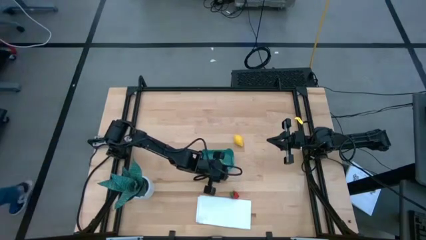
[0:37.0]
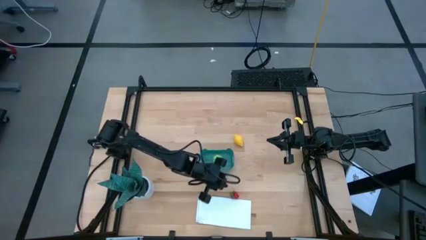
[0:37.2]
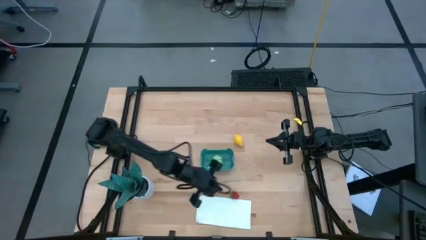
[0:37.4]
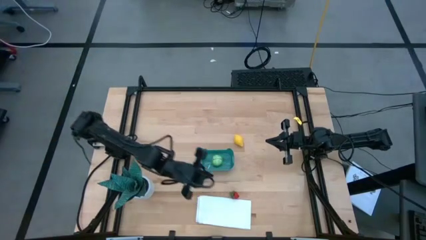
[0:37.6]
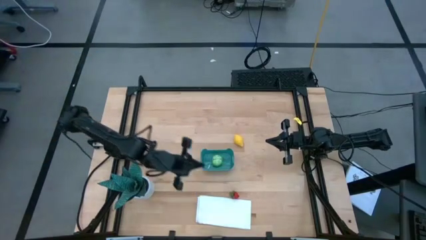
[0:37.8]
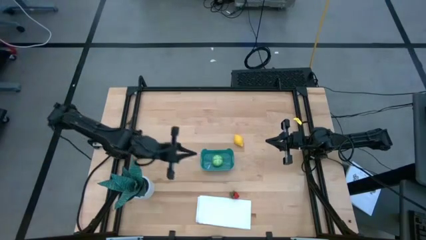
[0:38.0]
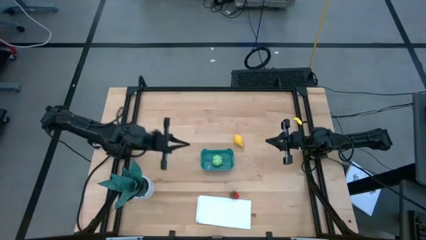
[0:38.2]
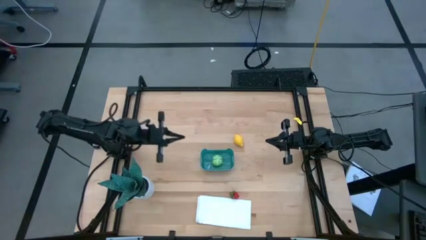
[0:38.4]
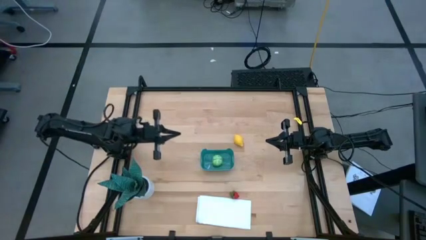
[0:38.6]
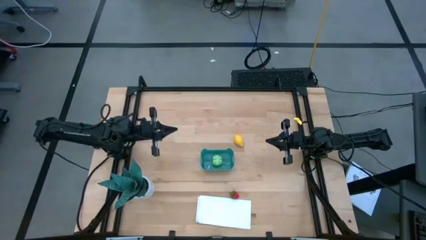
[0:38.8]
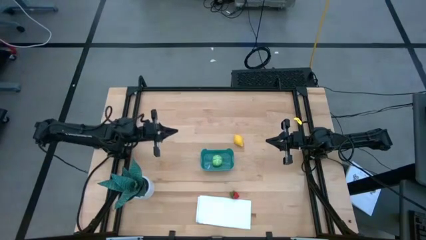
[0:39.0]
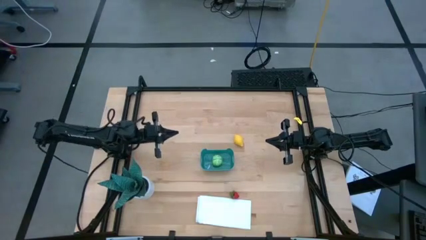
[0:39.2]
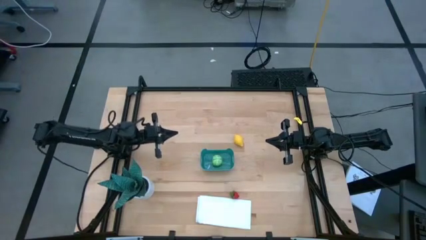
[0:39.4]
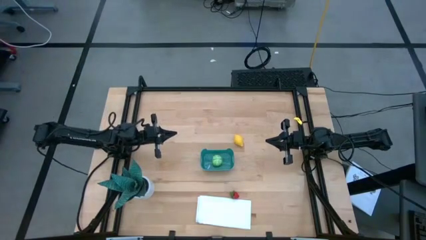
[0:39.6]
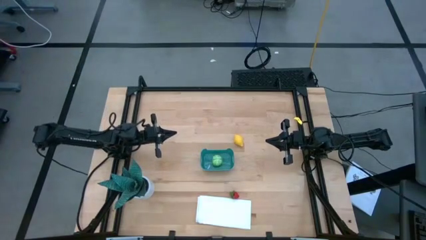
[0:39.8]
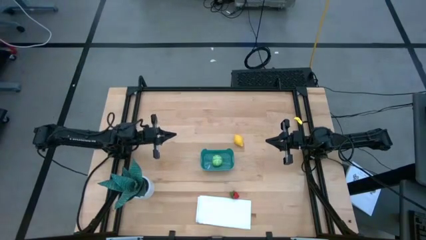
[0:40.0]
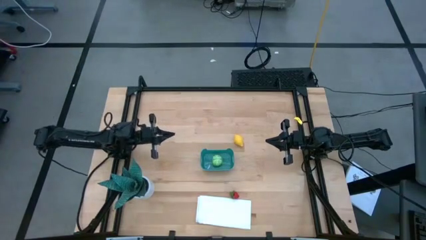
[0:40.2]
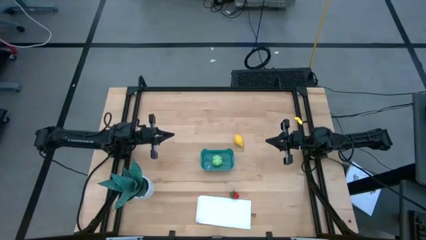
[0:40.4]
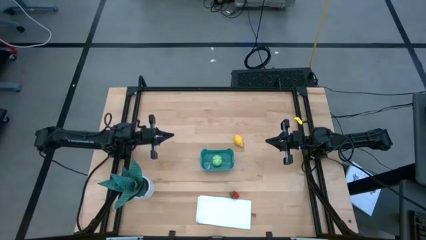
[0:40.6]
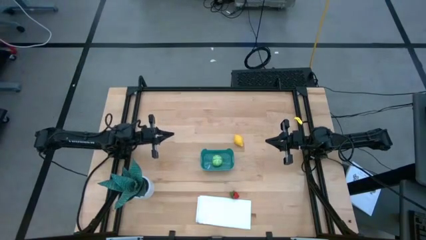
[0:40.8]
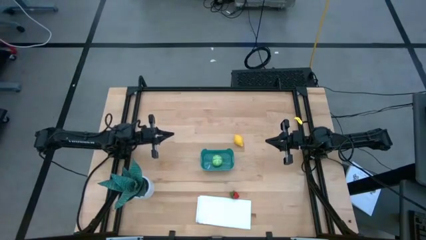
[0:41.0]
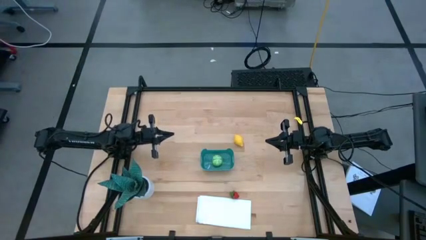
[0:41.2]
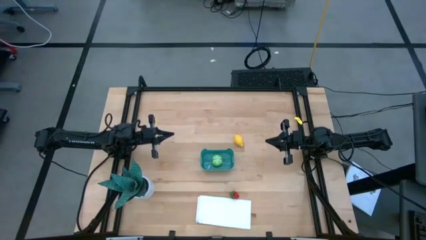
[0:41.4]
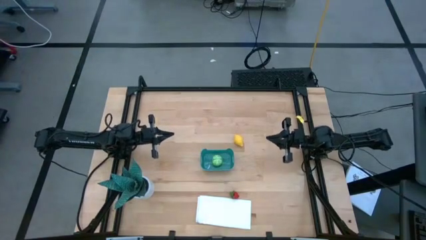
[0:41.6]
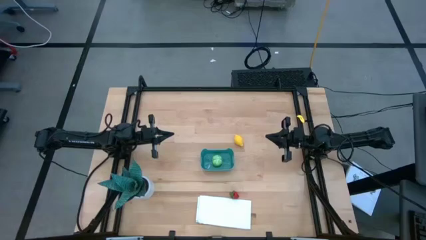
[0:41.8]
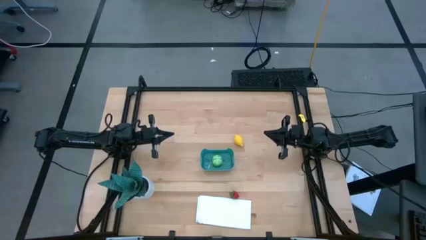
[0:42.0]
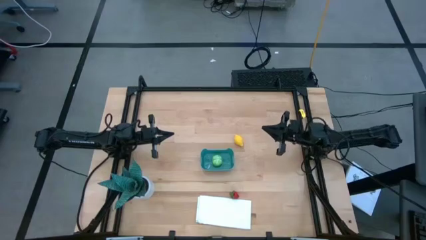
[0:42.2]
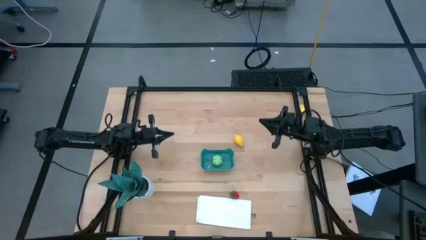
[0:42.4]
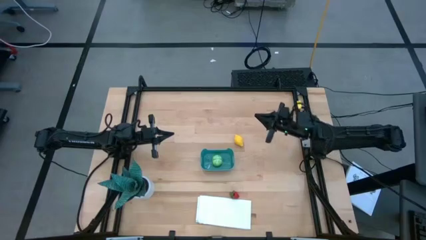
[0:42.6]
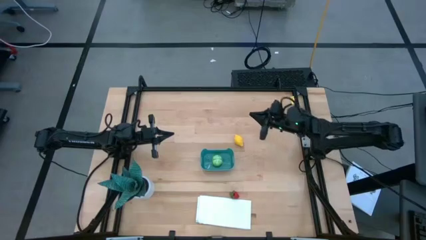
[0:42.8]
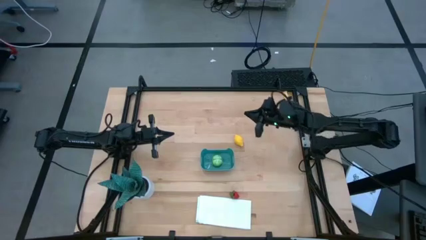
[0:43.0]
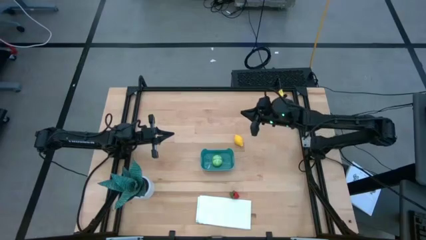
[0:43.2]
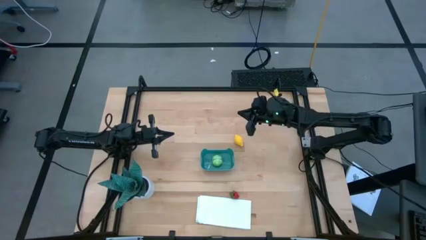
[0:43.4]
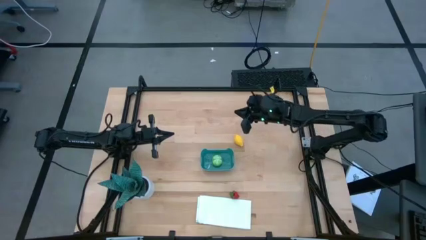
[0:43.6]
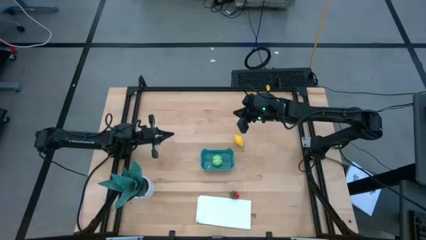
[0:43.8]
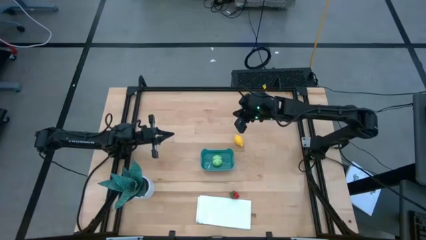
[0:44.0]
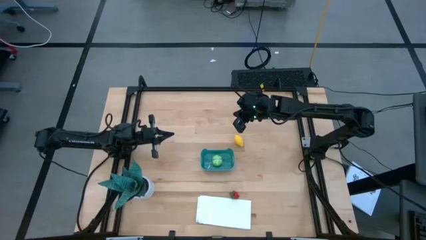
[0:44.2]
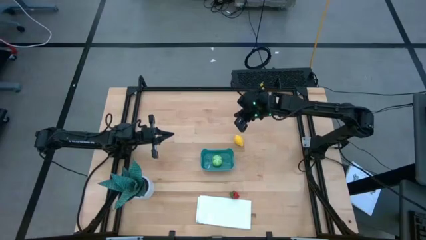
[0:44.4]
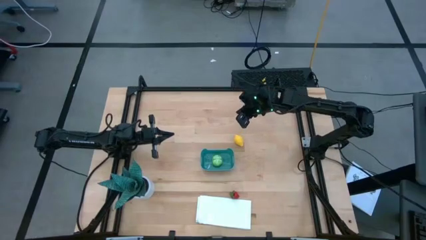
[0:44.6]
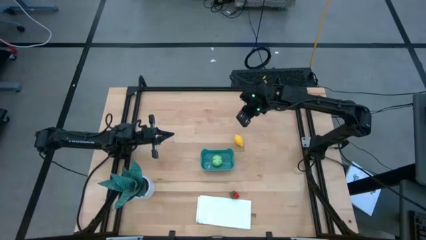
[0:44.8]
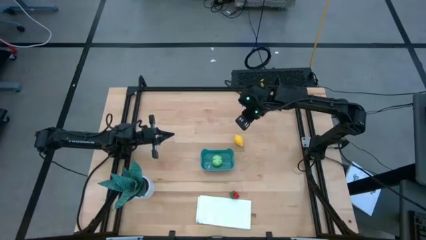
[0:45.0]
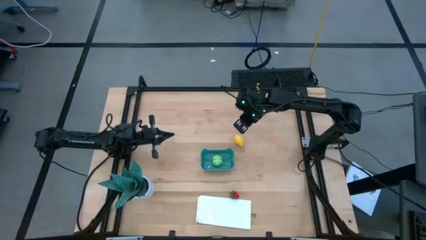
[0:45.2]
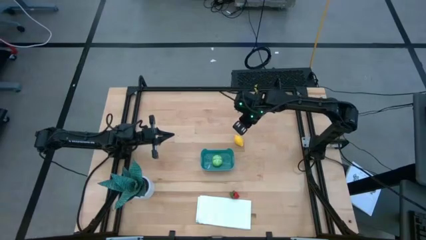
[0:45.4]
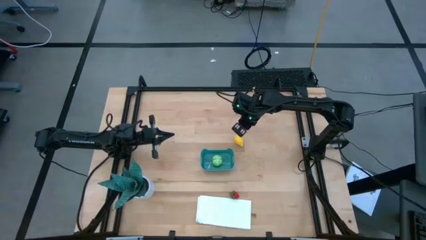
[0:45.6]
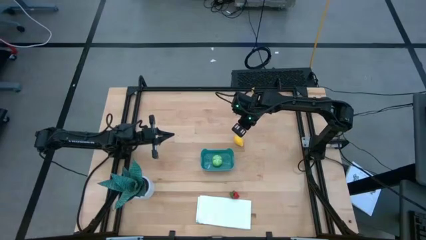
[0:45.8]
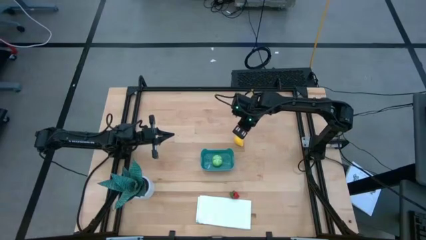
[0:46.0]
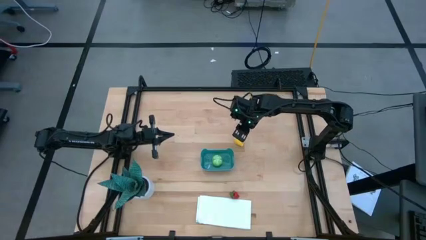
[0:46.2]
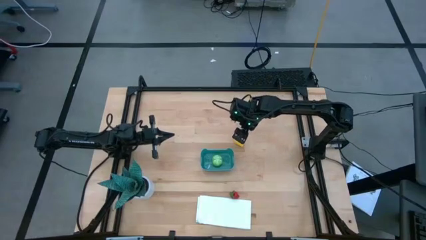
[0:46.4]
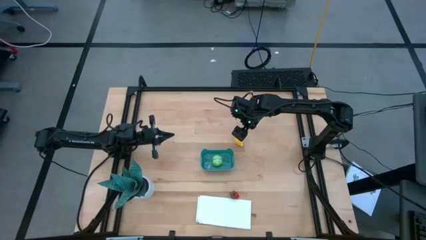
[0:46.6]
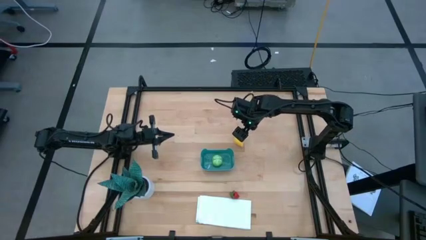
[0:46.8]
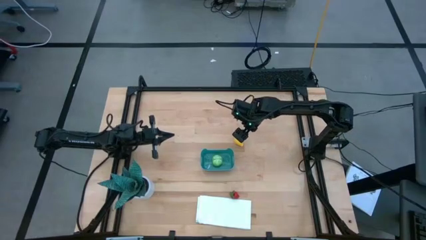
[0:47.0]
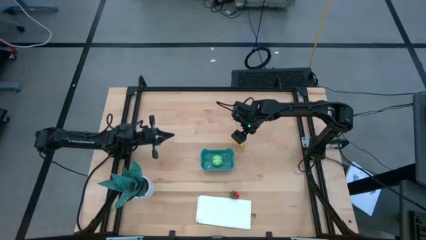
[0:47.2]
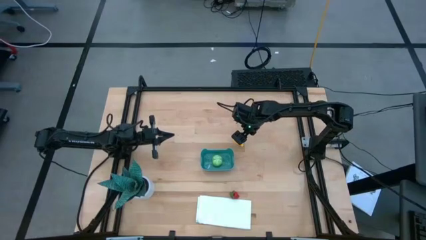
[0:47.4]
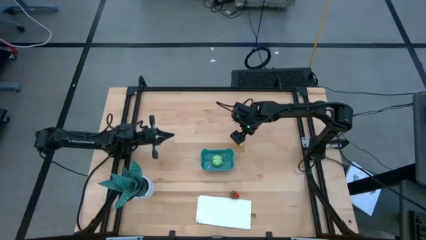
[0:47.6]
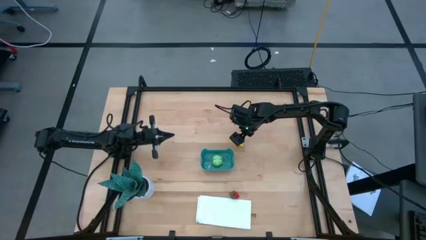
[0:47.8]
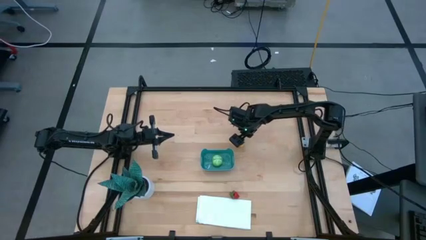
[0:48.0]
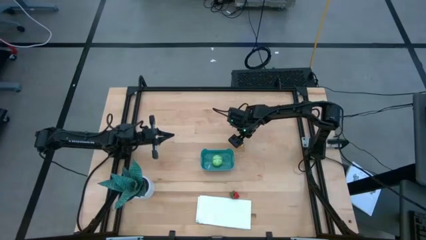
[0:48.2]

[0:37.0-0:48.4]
Task: Pick and placing Produce into tupperware
Put the lemon into the green bin

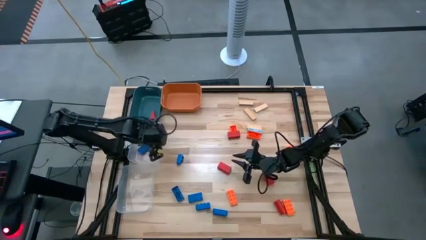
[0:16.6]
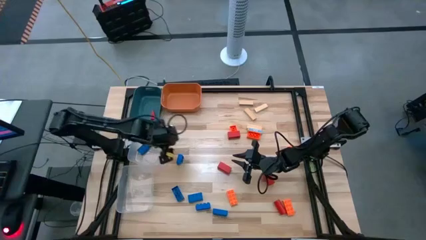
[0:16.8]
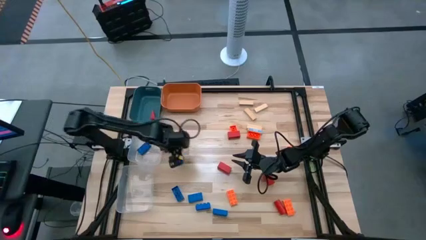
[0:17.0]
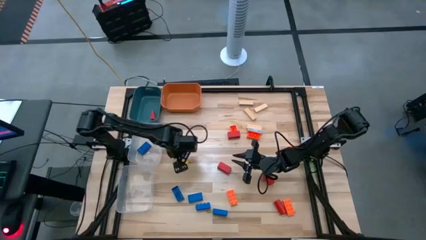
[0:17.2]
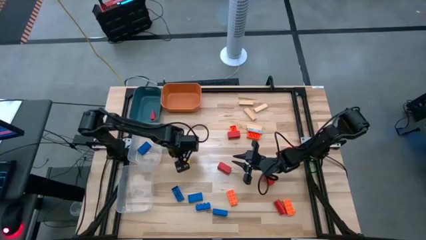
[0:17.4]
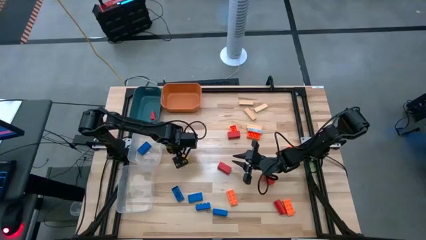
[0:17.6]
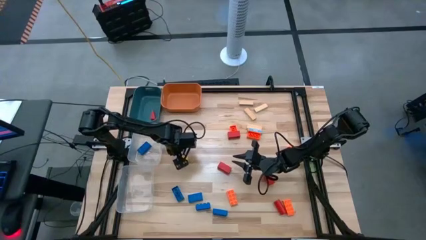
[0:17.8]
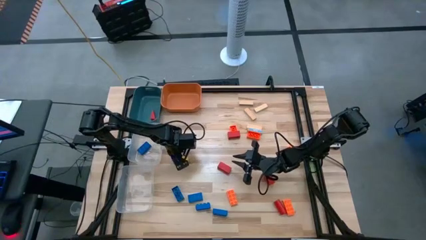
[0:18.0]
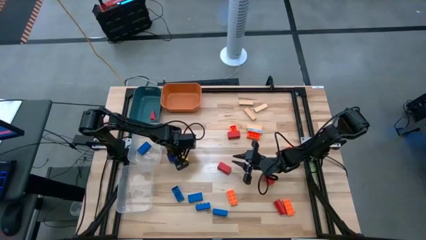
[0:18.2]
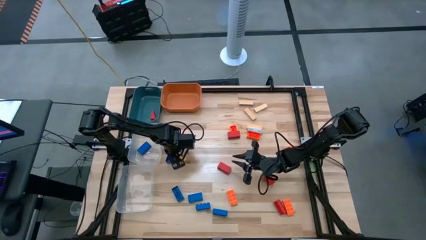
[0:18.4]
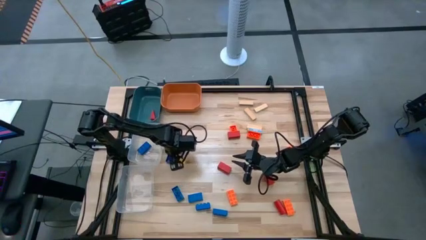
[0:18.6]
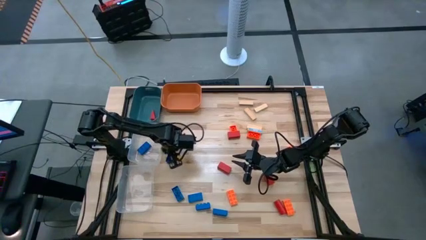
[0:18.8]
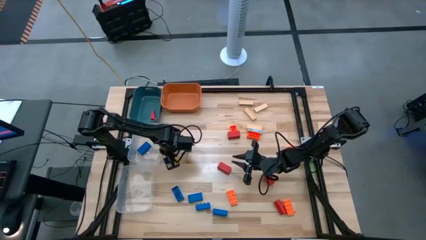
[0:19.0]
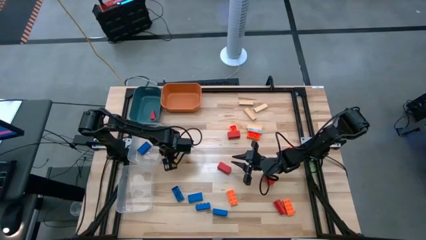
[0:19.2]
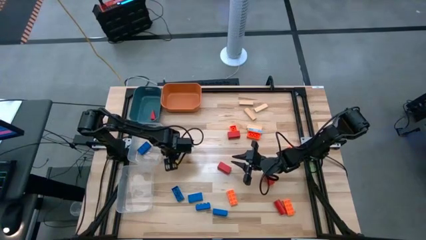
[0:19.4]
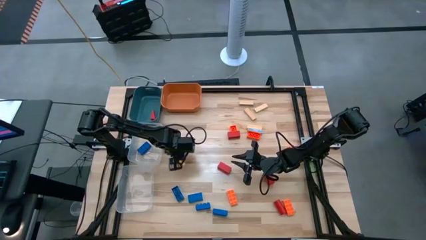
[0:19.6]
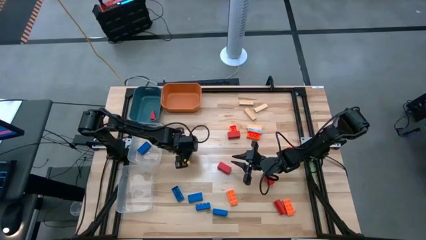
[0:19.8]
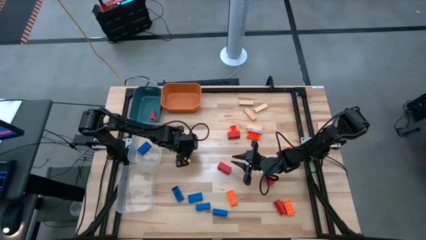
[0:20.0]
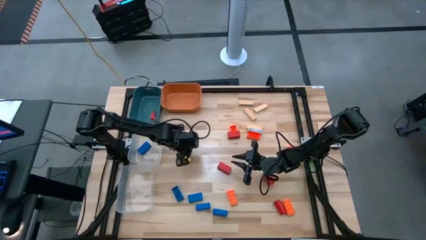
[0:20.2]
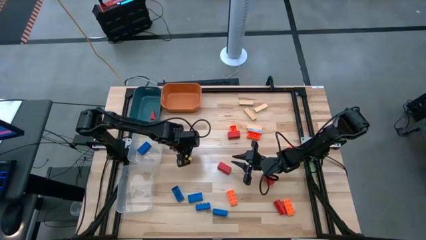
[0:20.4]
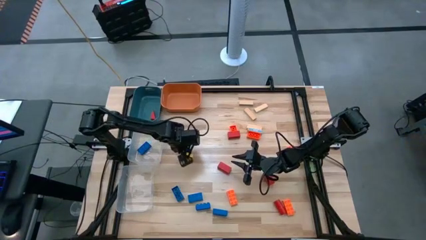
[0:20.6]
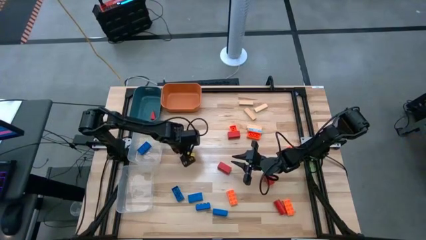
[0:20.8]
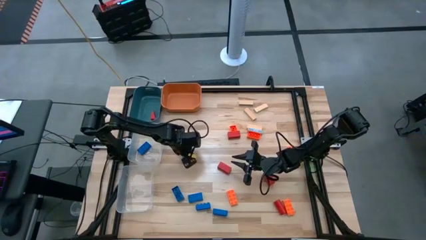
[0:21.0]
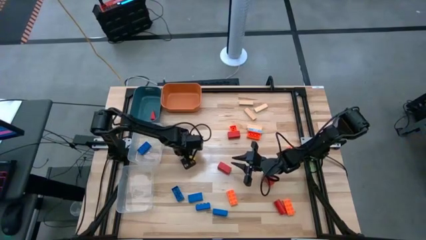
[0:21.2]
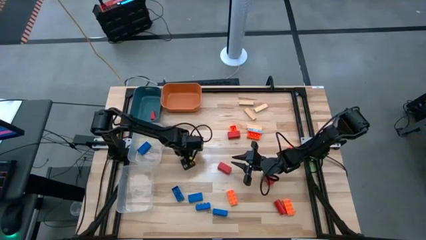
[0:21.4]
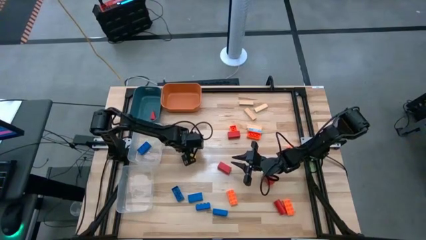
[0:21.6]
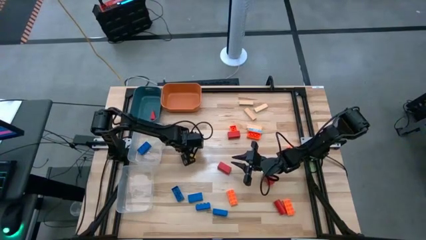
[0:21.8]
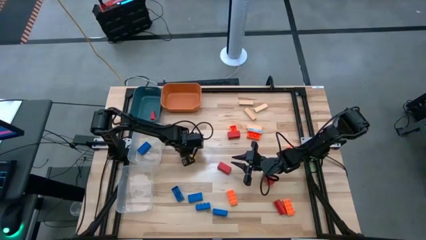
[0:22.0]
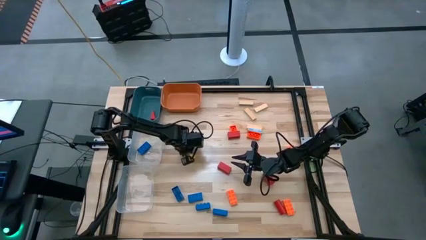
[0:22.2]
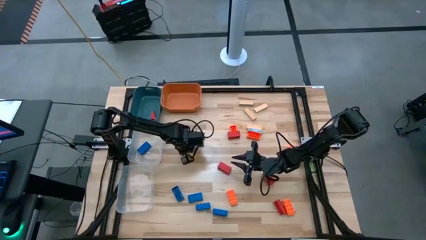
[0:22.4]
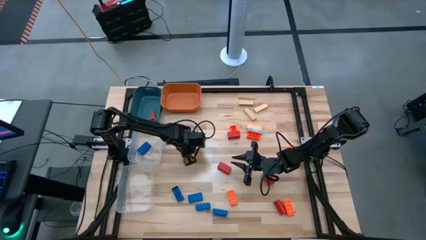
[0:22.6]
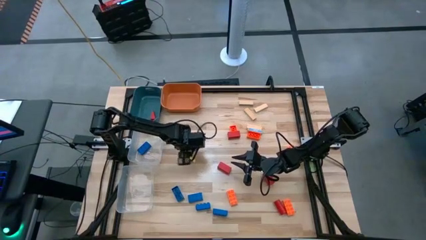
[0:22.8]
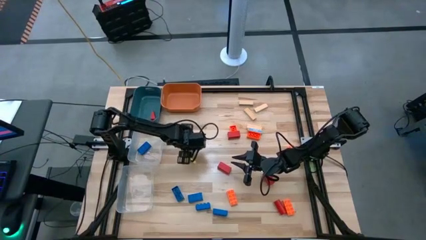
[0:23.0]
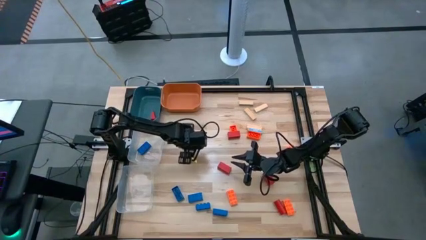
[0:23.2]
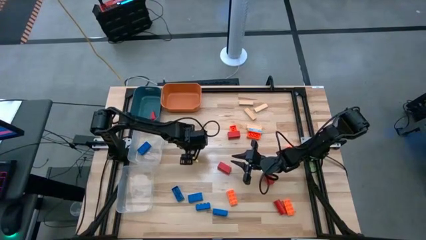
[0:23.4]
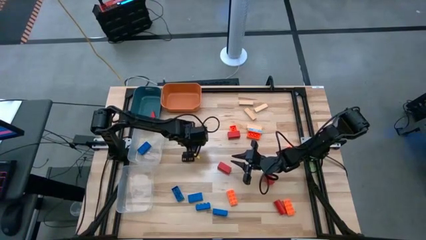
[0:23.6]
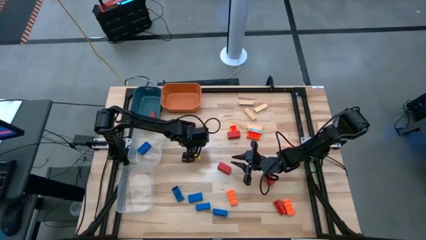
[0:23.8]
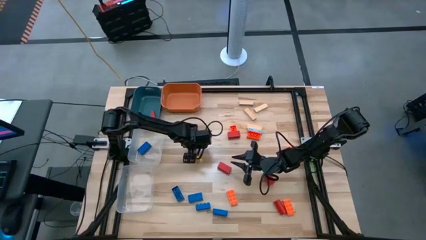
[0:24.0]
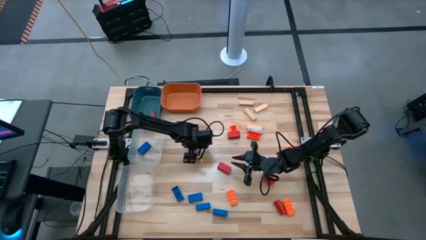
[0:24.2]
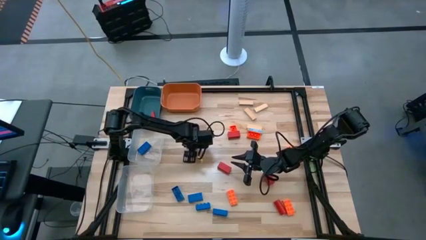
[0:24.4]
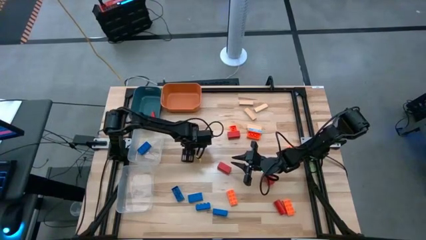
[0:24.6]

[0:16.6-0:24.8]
Task: Sort blocks
Put the blue game piece into the top transparent bin
